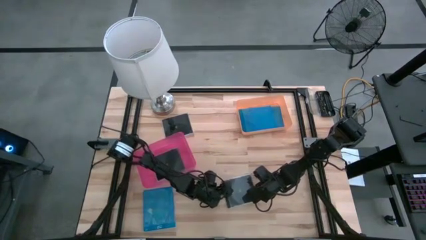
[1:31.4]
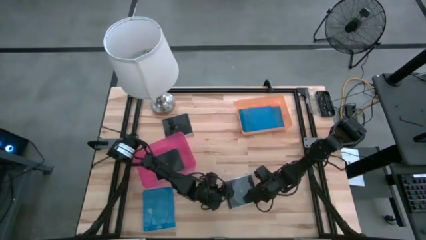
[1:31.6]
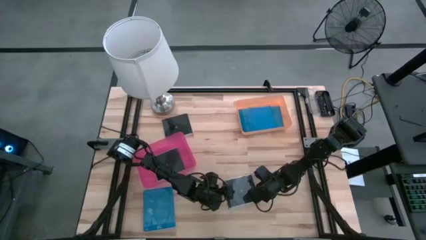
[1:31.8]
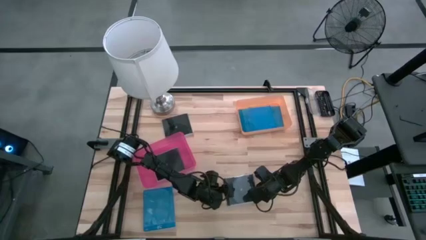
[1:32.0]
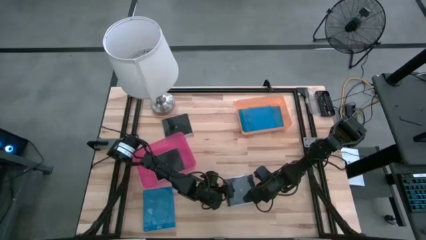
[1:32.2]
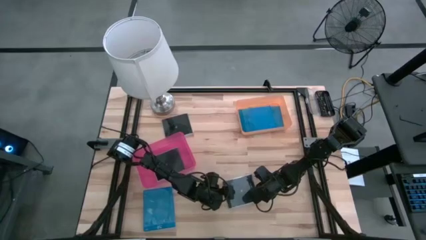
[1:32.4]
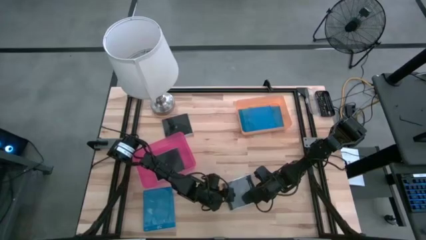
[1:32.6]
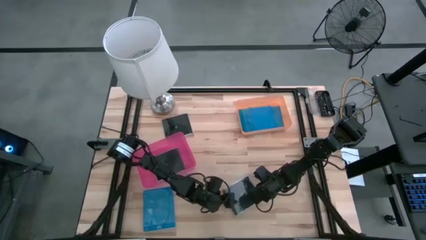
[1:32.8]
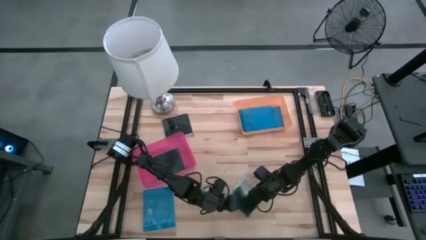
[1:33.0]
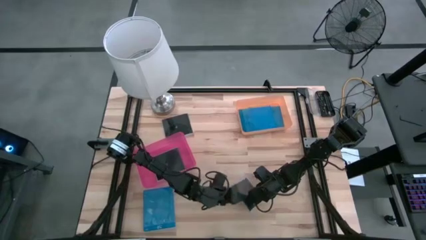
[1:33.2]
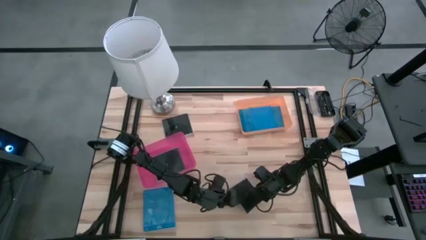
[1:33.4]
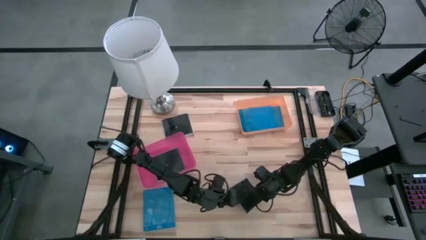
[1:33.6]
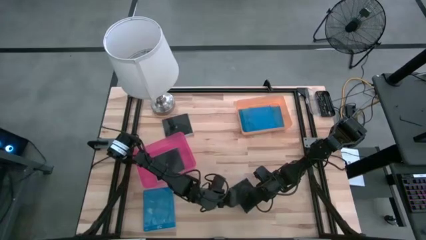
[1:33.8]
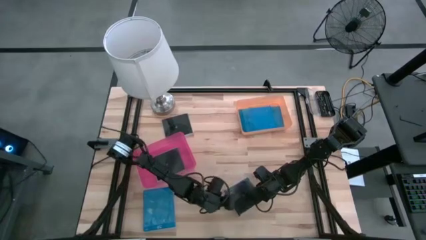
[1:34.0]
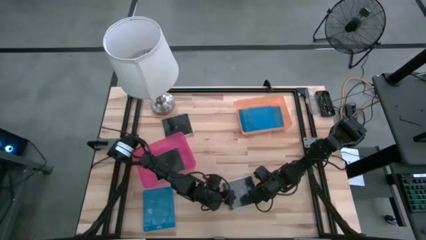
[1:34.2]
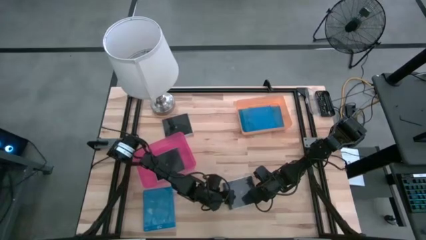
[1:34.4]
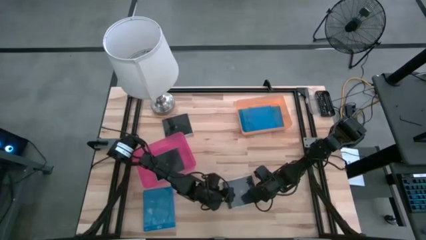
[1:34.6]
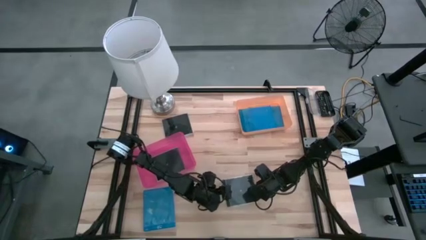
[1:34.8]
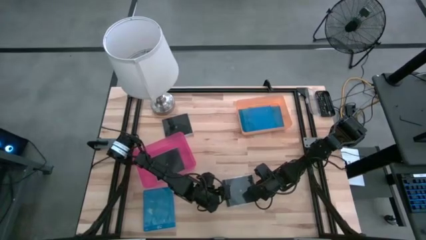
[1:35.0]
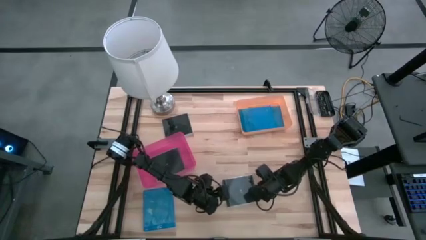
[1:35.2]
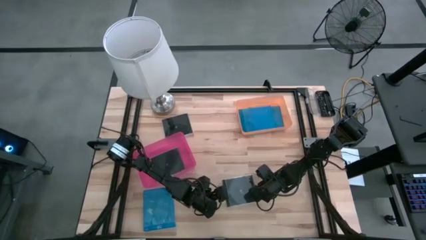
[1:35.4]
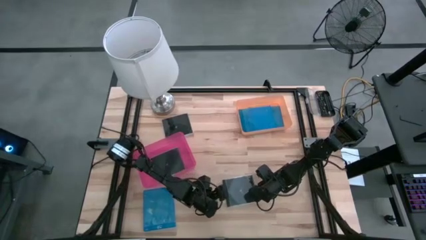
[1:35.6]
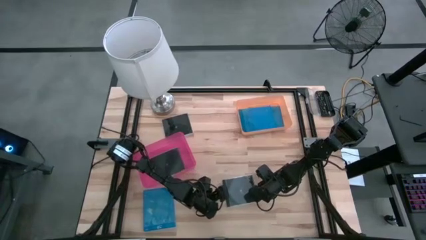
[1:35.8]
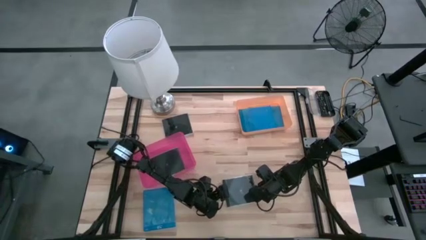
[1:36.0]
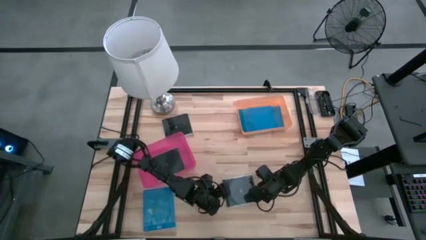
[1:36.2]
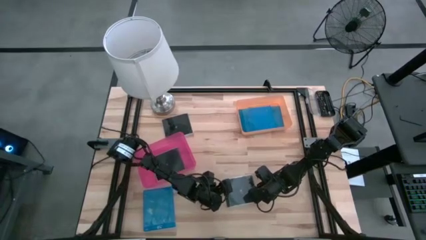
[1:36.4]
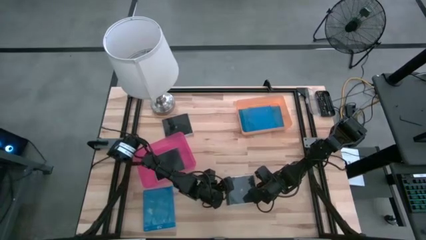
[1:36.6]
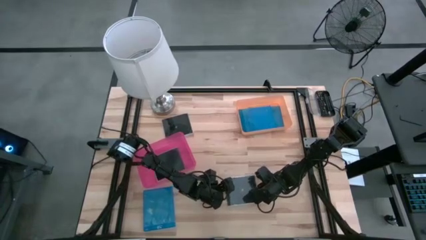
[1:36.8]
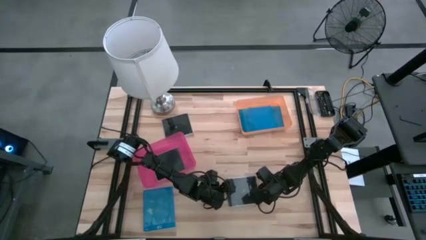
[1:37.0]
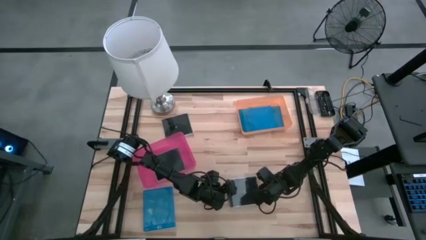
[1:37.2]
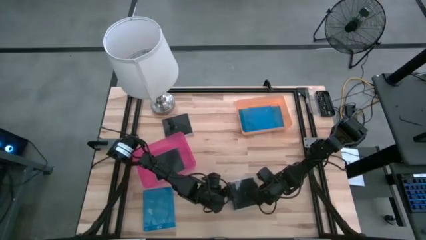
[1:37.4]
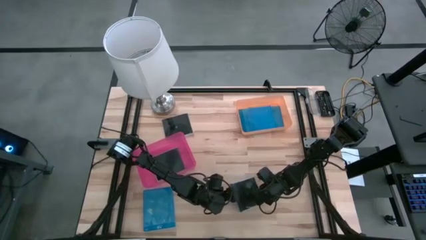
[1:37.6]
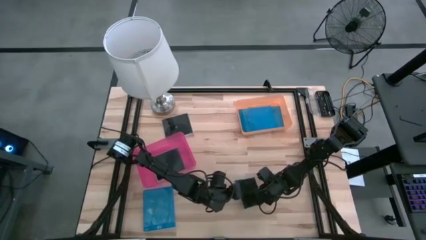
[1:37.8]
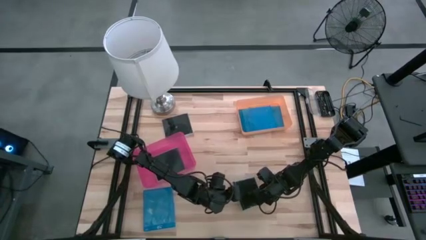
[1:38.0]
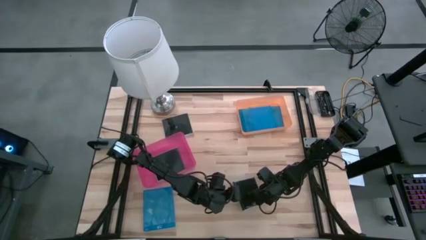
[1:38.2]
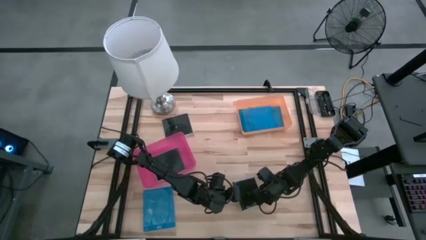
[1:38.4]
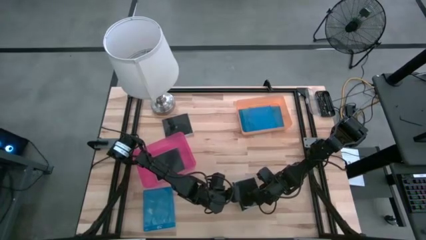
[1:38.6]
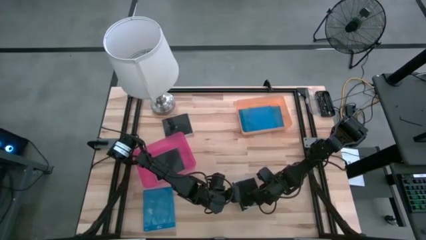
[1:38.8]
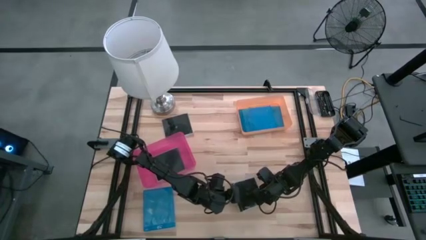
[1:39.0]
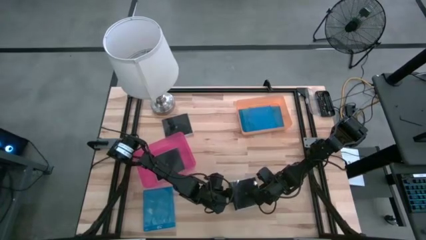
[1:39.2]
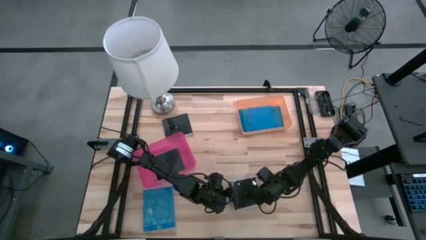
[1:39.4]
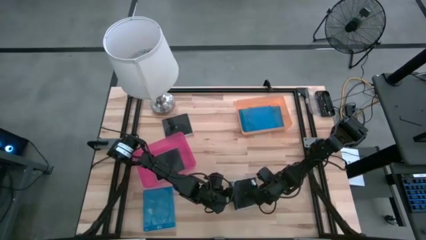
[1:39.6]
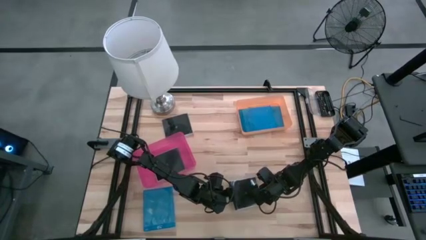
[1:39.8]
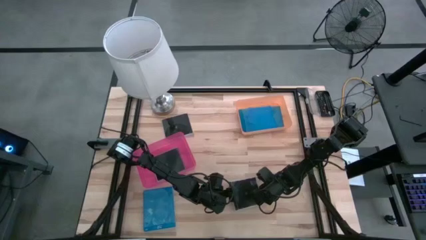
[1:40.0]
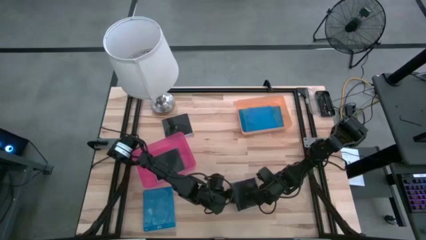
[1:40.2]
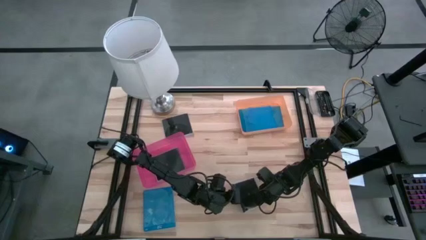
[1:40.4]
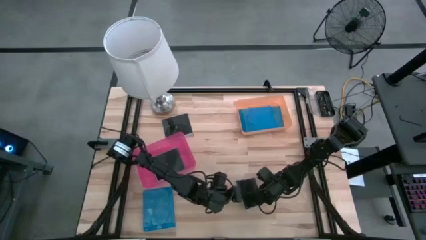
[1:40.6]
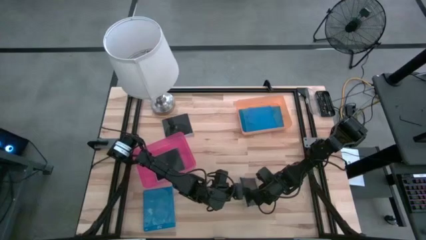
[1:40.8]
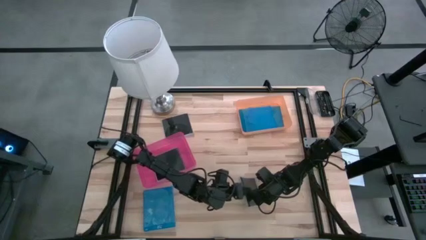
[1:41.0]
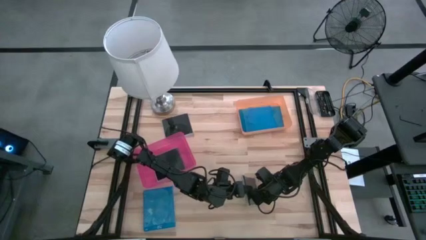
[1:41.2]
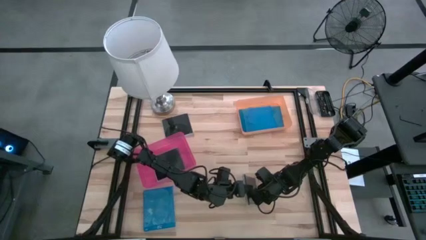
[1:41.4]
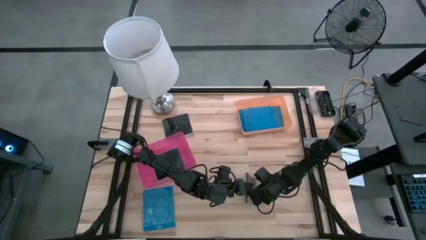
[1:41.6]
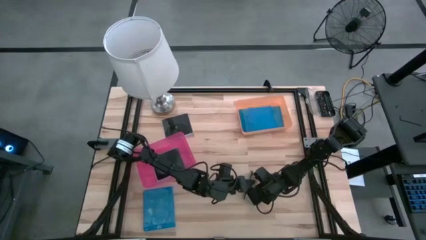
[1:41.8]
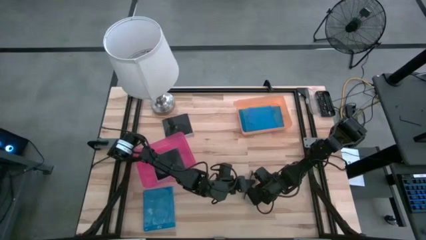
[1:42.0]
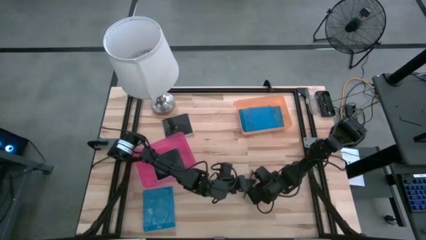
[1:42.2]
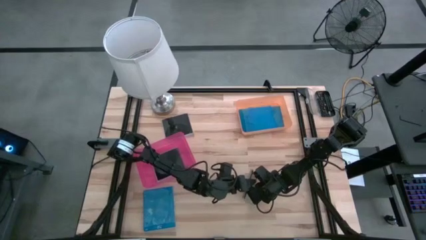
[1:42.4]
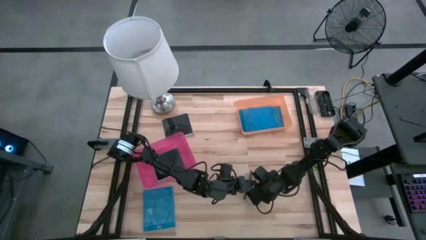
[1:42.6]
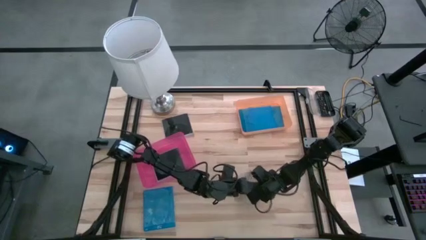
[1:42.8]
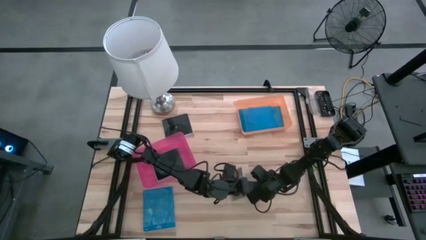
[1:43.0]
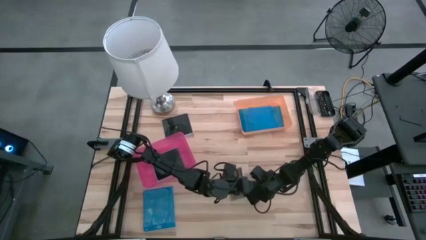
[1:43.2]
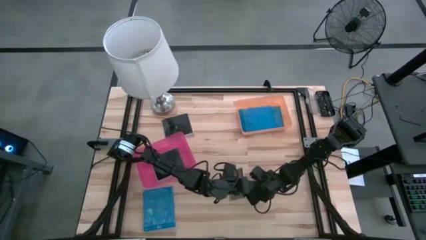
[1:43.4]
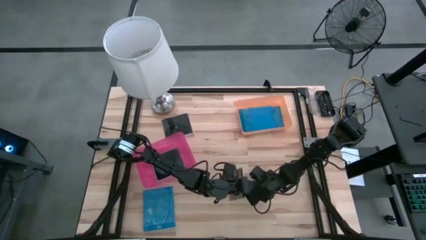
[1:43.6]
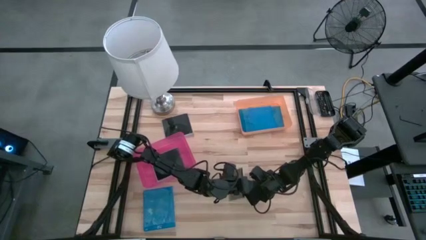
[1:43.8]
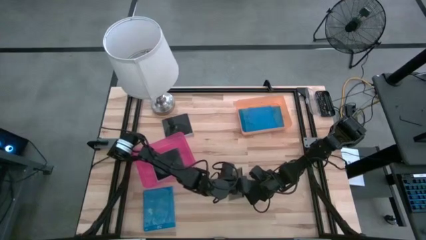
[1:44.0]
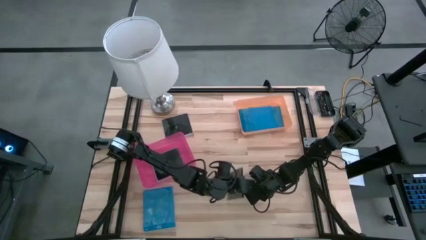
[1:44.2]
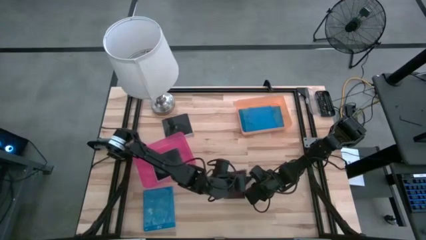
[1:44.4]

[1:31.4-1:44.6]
Task: Pick & place jewel cases by type
Put the bottom black CD case into the pink bin

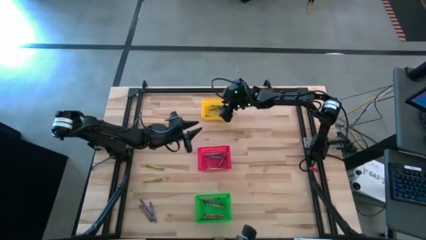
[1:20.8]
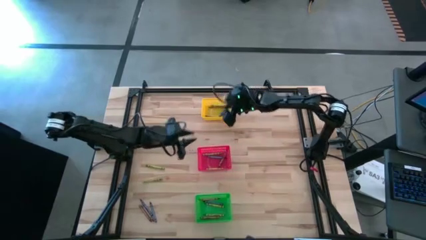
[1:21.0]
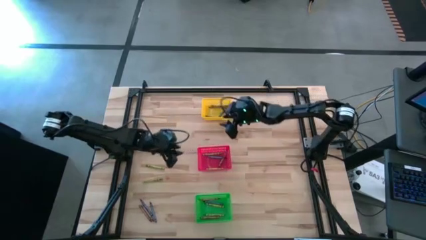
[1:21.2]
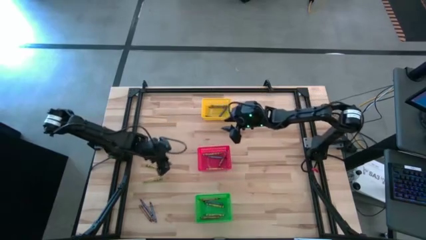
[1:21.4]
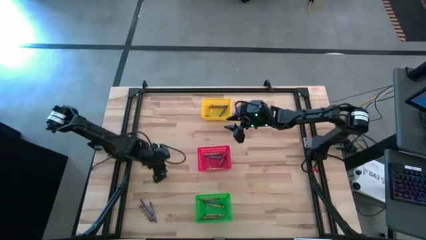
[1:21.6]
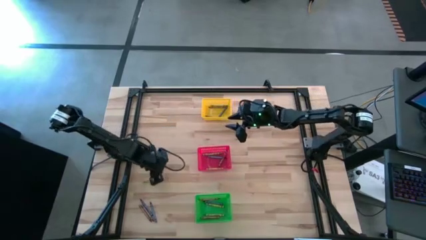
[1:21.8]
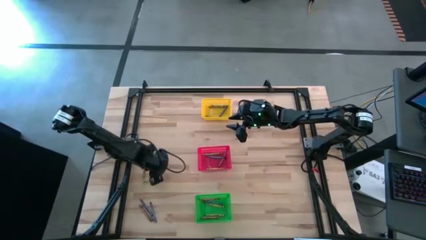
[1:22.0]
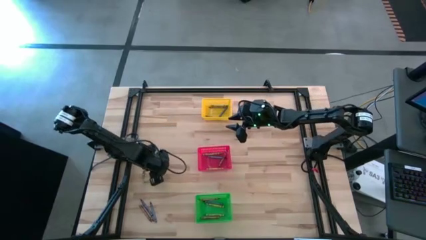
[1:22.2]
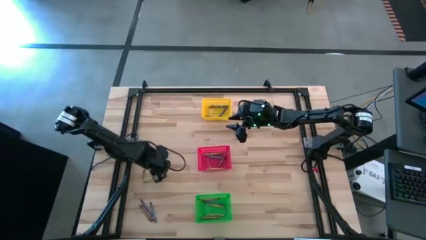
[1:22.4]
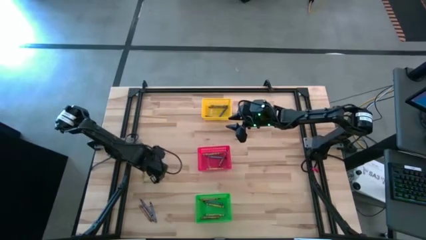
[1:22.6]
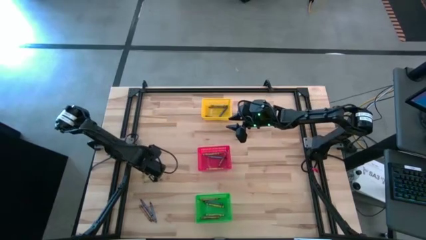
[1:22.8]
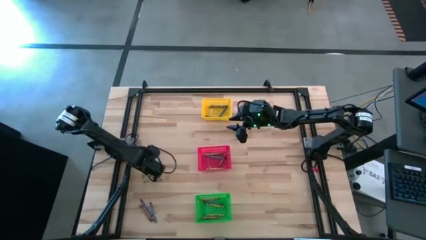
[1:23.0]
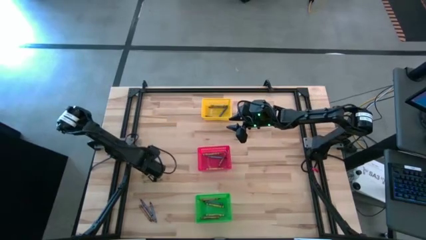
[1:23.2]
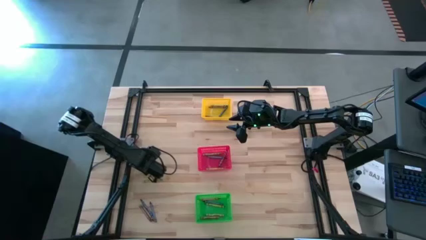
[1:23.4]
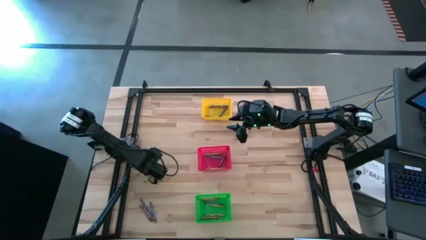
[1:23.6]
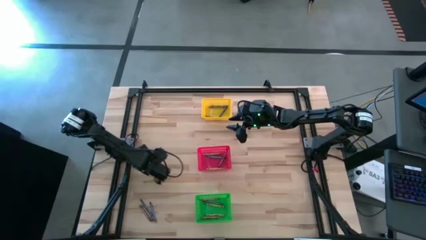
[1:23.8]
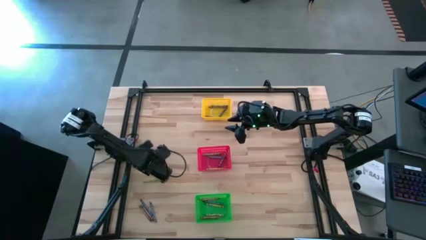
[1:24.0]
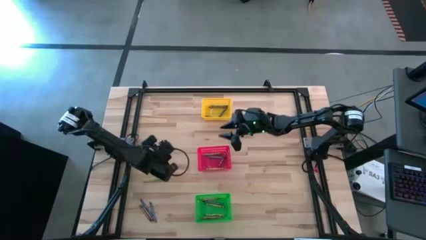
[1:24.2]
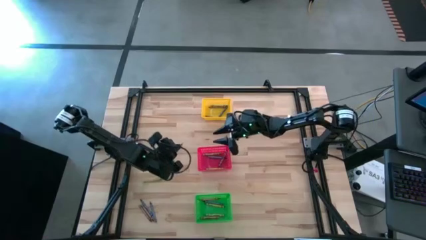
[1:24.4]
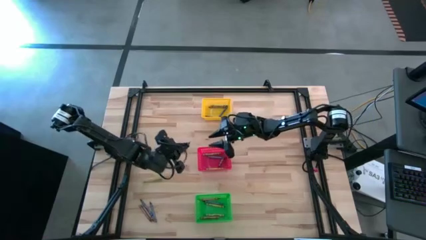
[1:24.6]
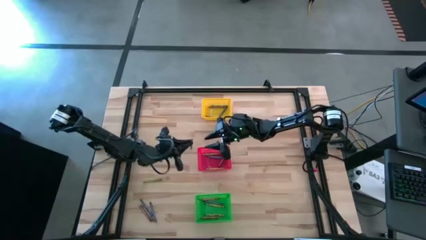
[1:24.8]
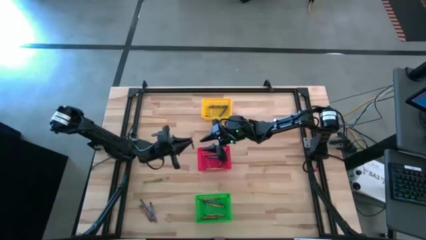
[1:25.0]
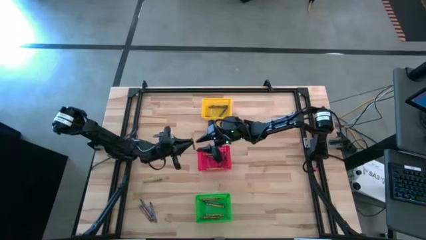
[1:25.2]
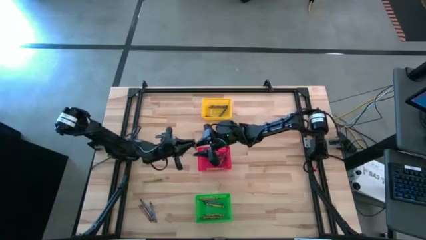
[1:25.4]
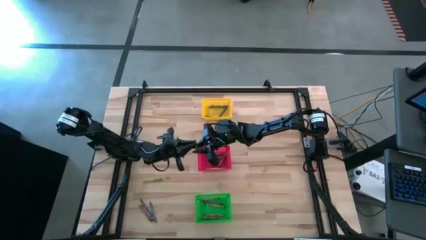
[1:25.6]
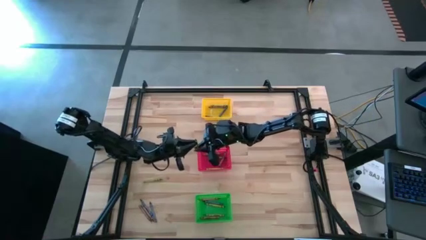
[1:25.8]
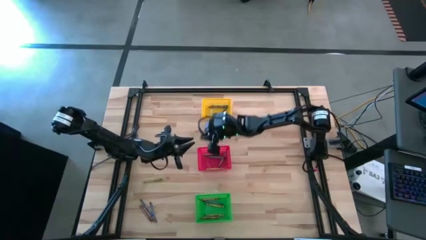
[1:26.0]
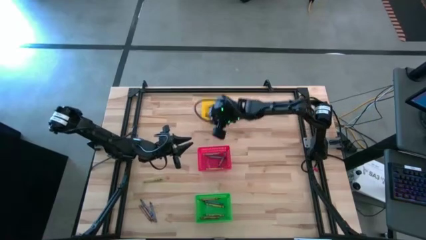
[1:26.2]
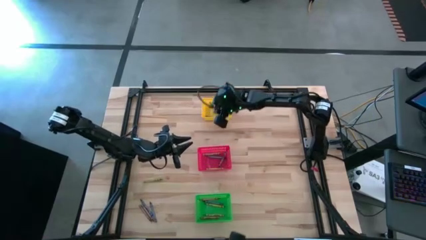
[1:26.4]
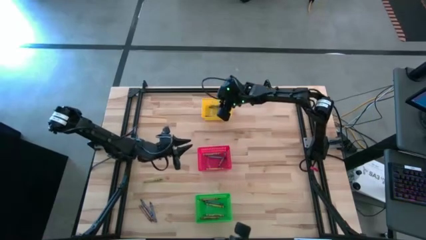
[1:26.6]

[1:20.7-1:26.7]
Task: Sort crayons
Put the green crayon into the yellow bin
